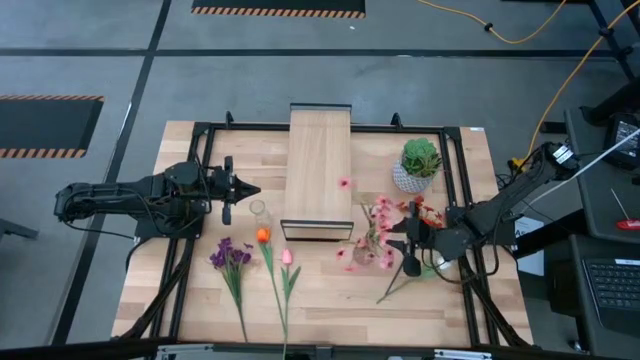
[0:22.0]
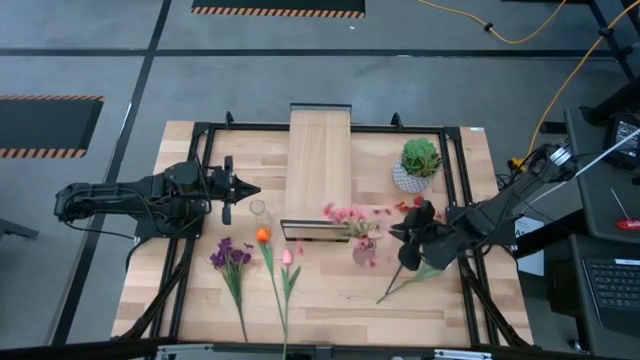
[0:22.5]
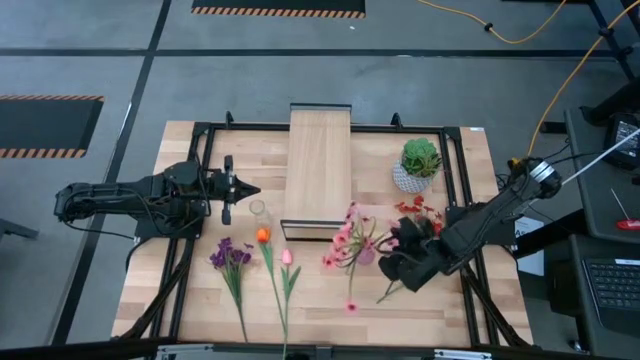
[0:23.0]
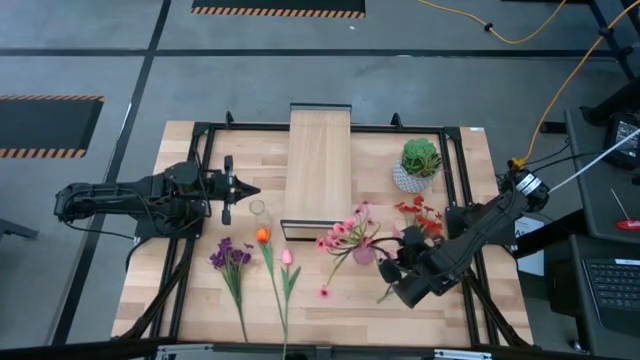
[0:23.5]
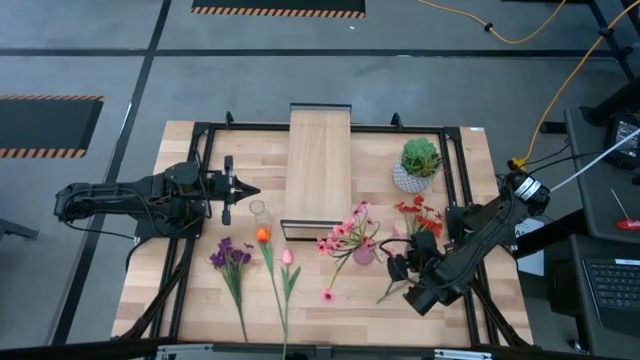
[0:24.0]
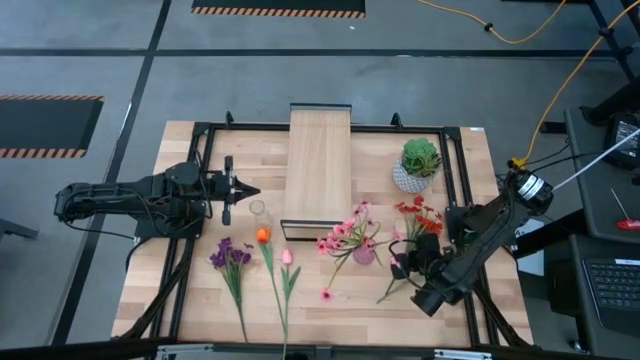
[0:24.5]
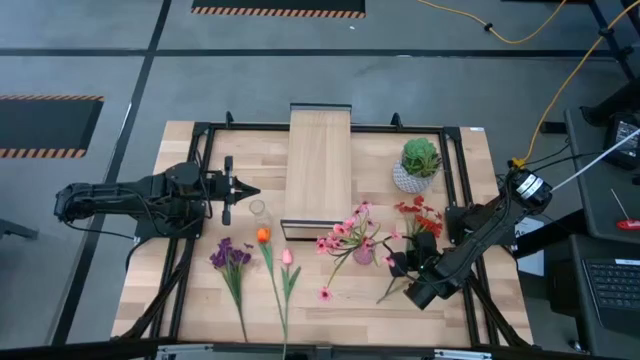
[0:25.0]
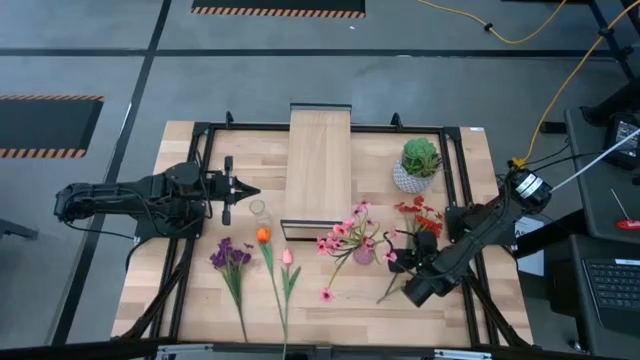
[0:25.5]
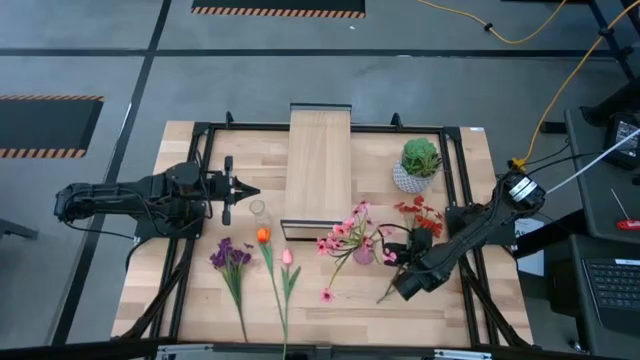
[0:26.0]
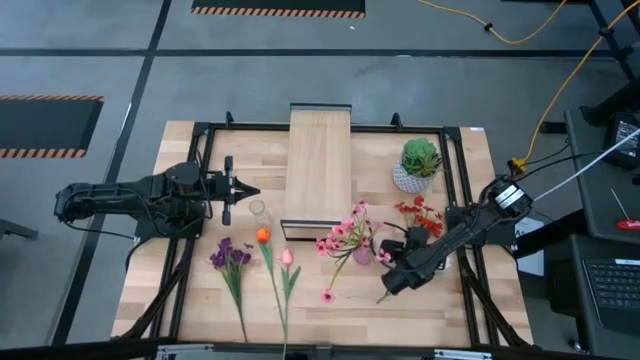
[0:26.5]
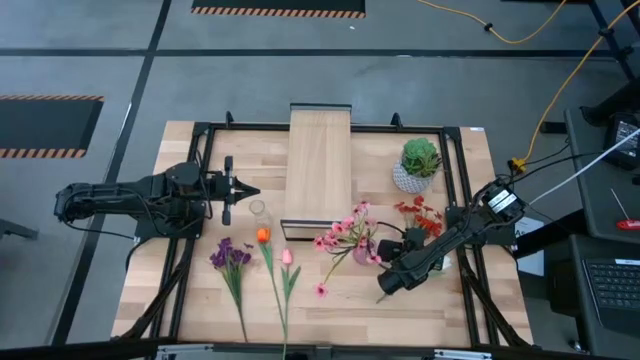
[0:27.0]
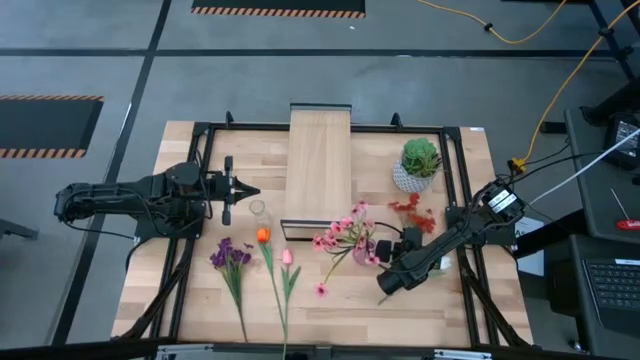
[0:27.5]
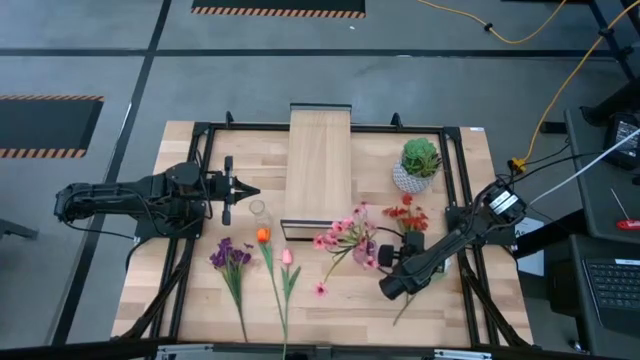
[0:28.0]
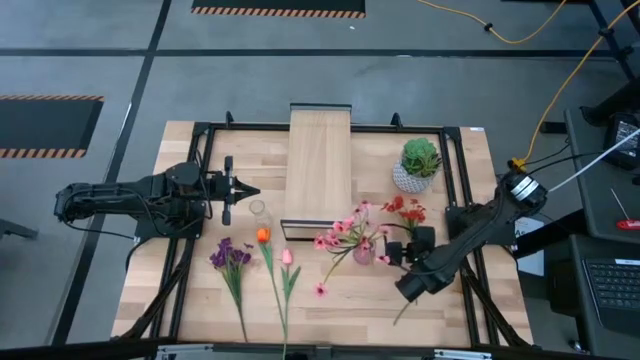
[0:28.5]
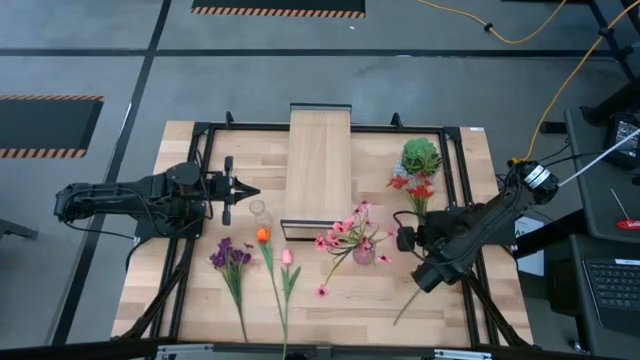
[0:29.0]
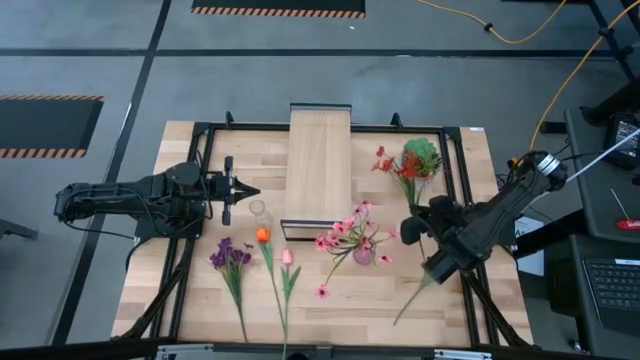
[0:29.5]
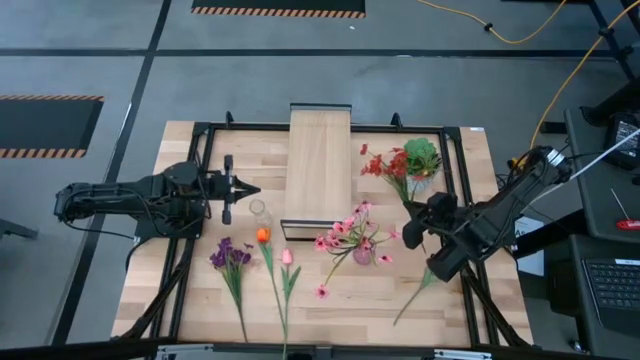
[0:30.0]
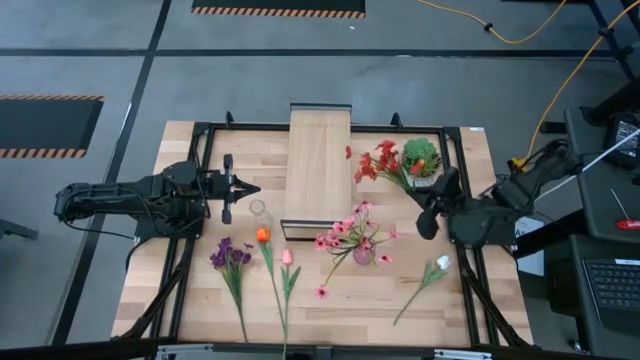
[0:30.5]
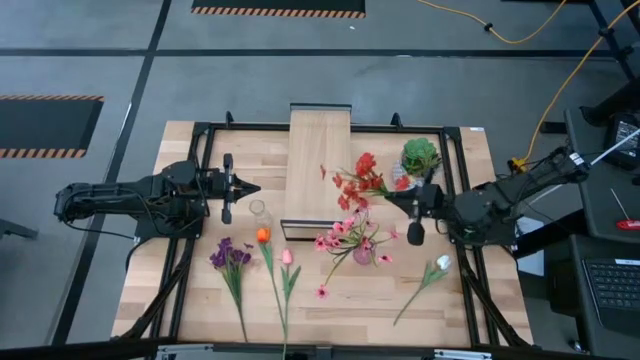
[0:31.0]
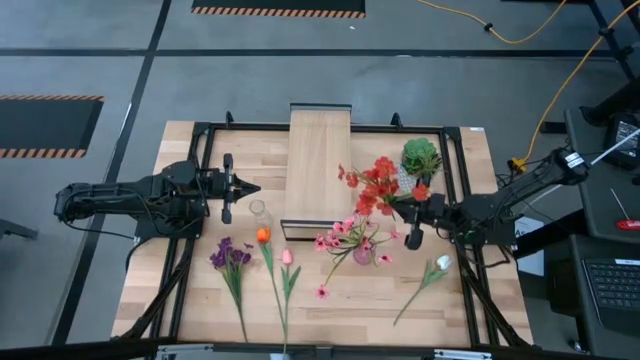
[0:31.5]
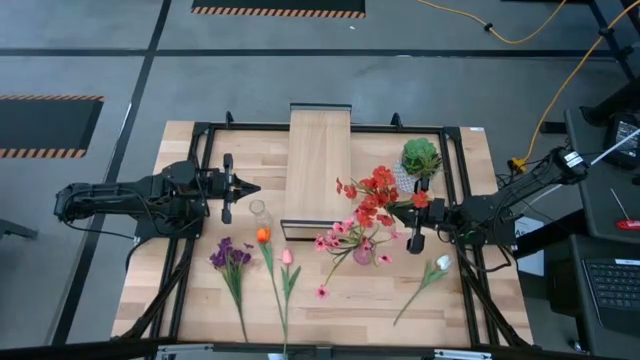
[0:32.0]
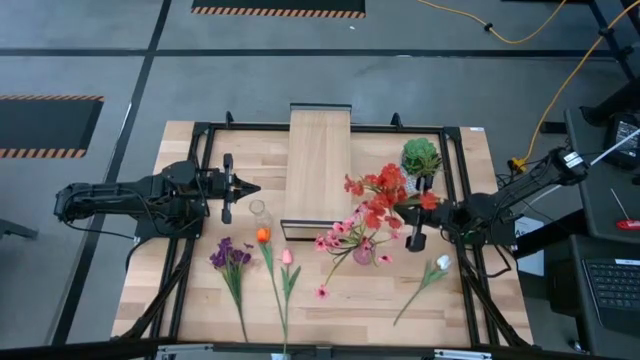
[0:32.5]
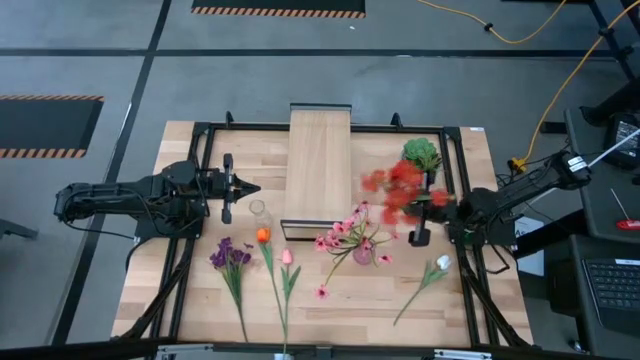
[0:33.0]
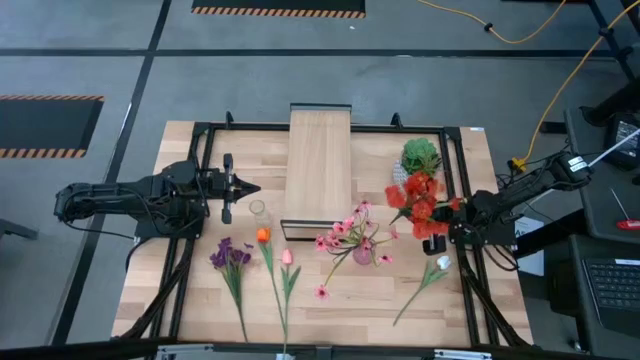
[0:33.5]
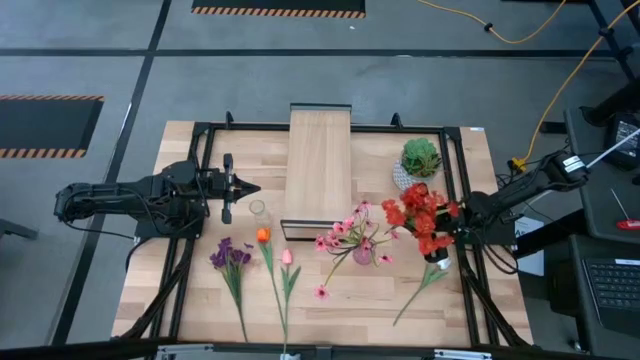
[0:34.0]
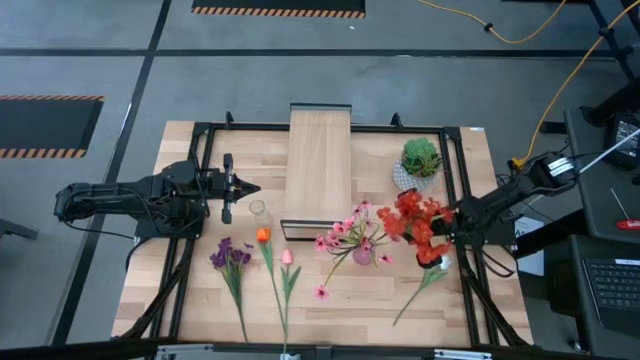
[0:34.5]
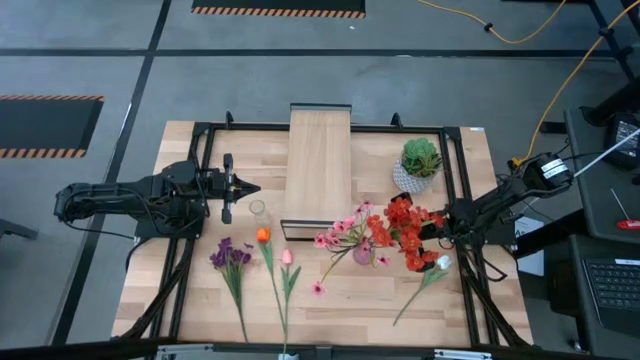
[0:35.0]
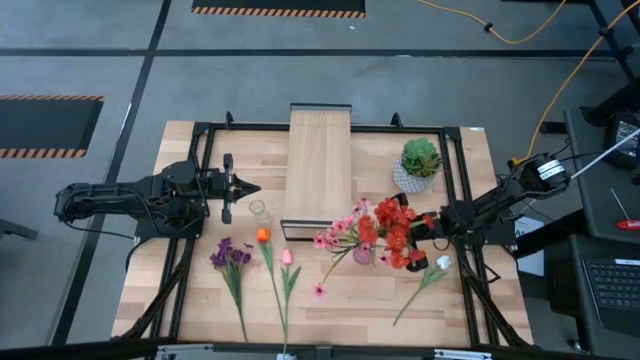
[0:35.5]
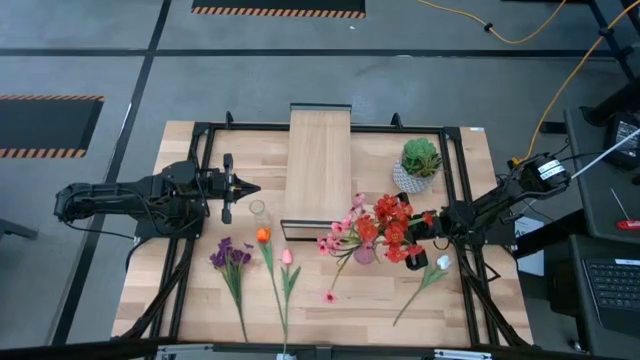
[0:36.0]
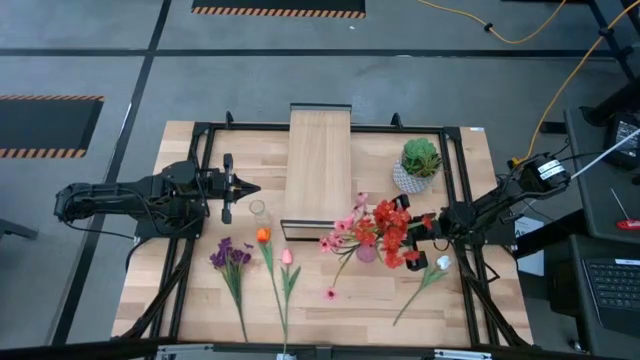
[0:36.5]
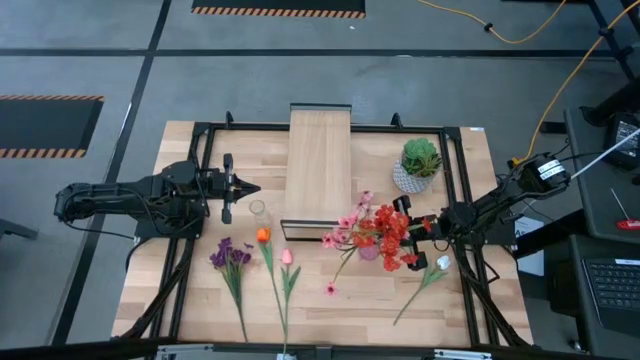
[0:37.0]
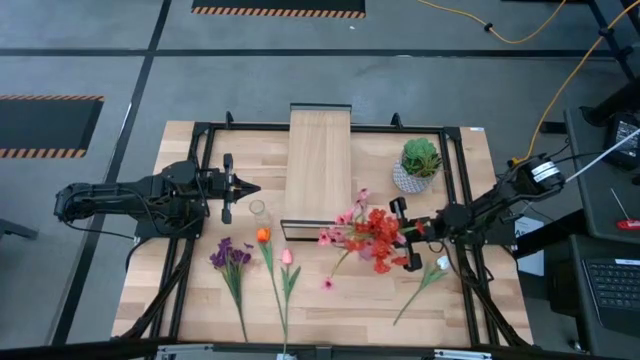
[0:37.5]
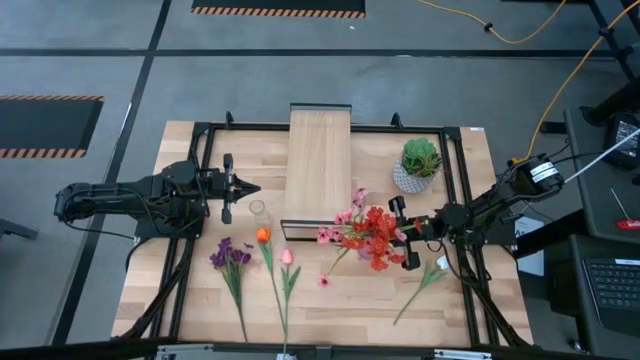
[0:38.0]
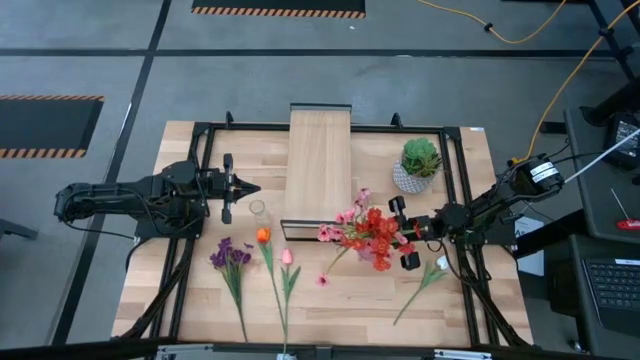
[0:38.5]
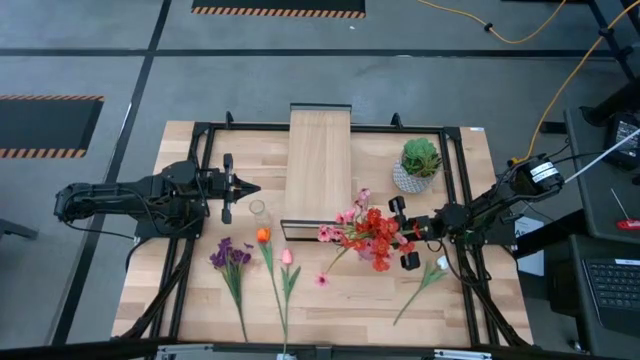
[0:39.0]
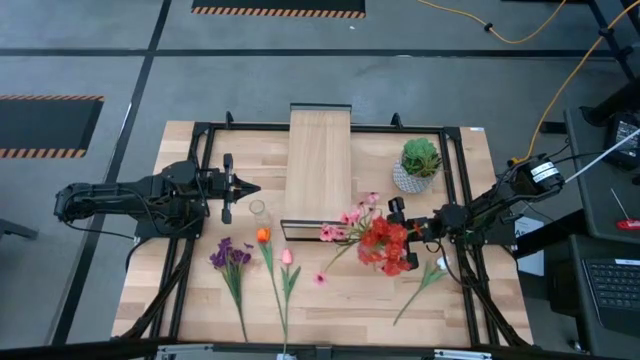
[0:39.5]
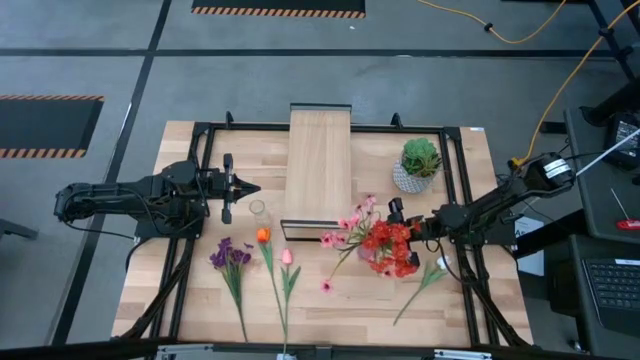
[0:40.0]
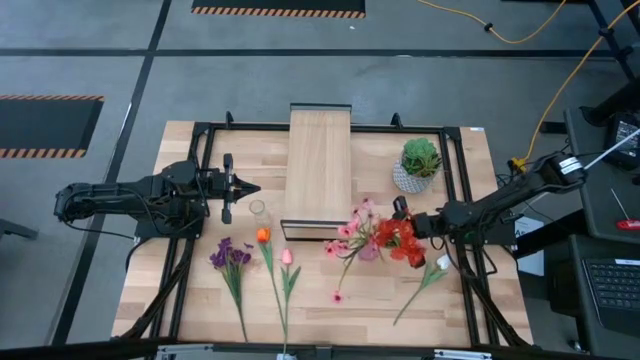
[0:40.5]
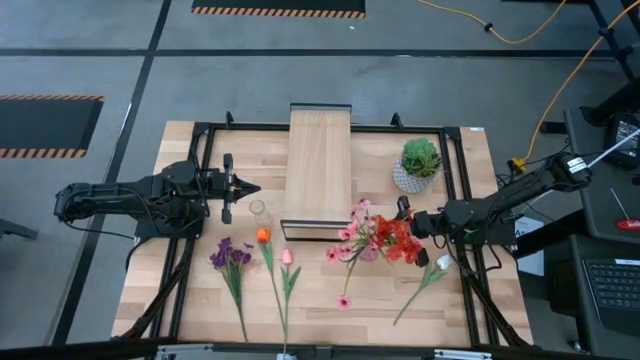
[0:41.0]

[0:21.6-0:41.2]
Task: Pick and place flowers into a vace then onto a shelf
Put the orange flowers into the purple vase
